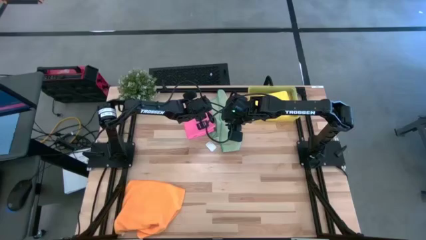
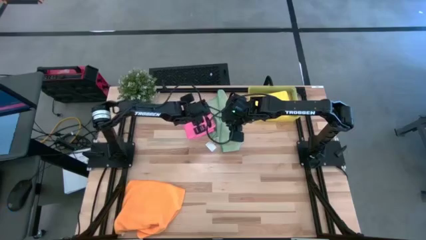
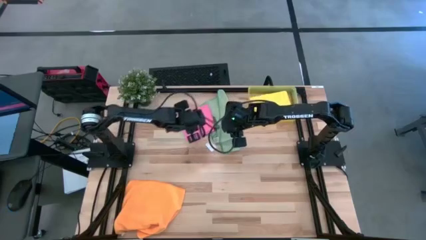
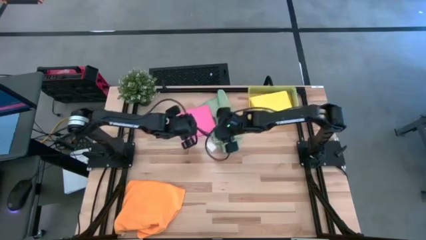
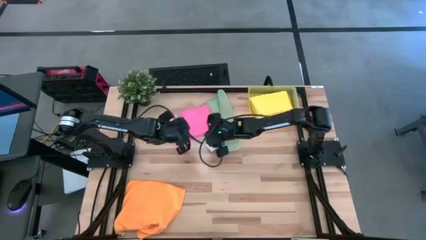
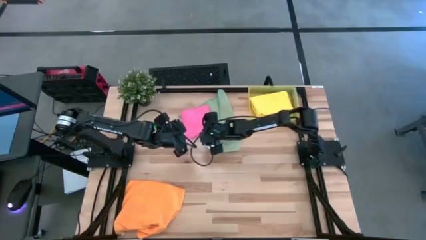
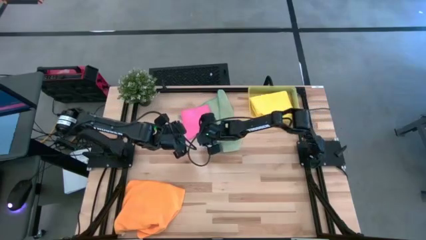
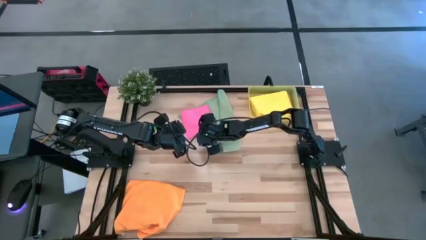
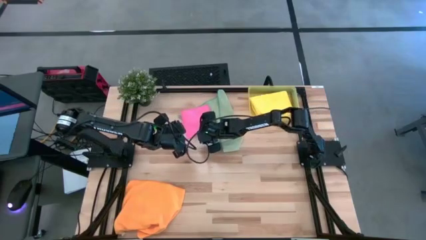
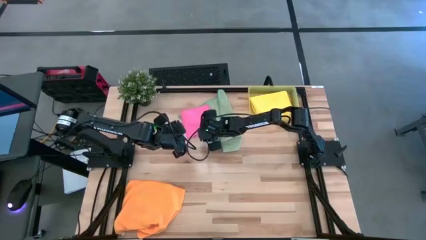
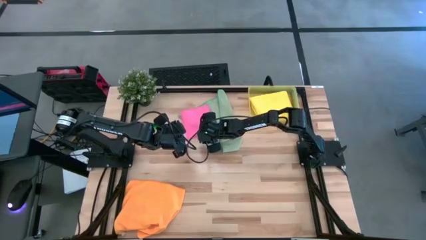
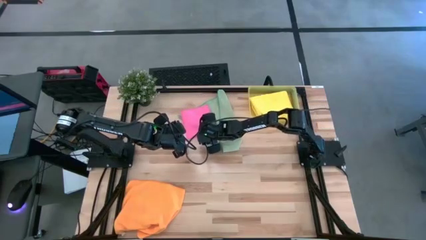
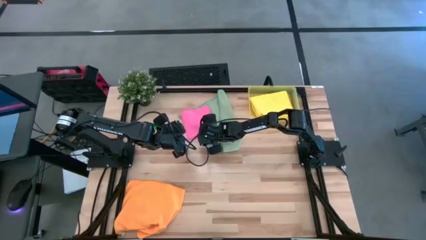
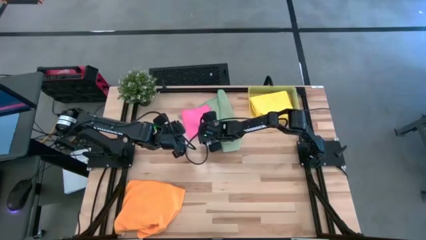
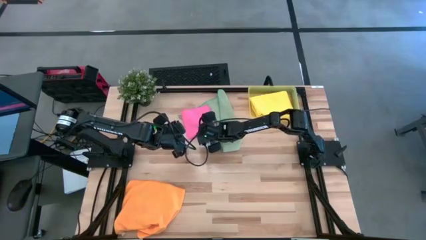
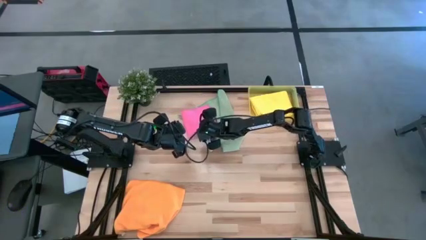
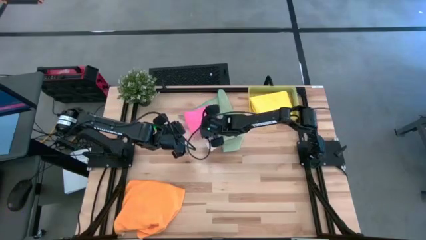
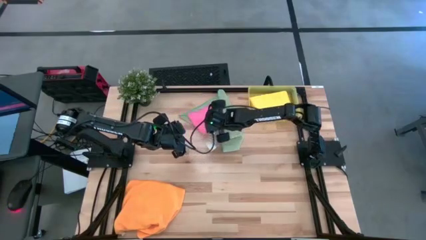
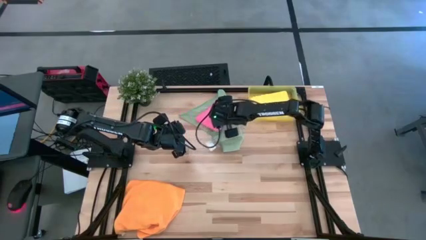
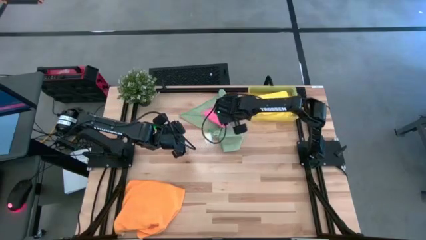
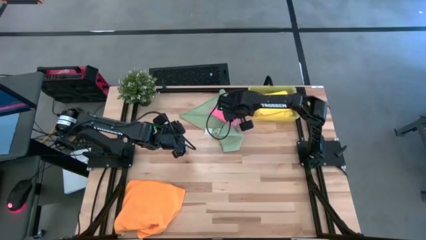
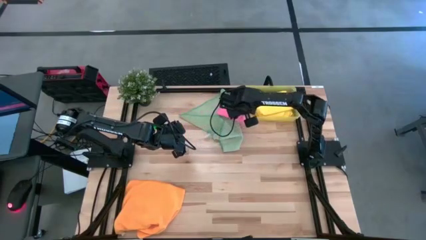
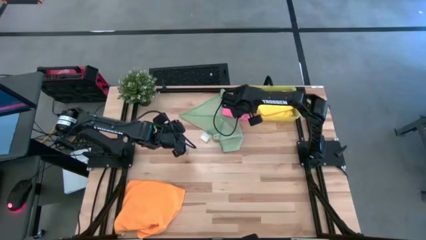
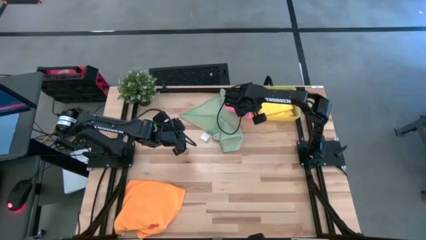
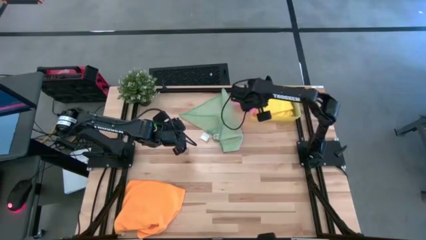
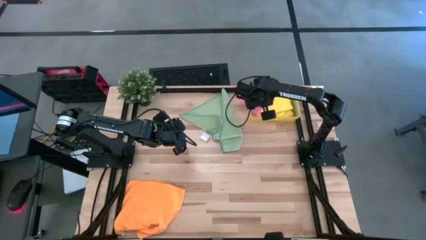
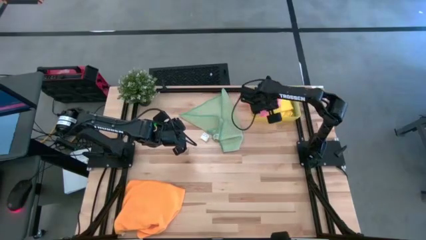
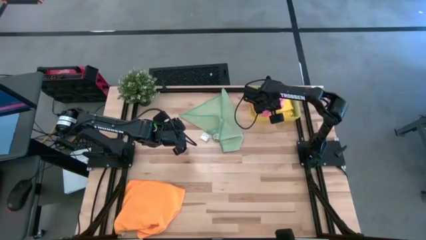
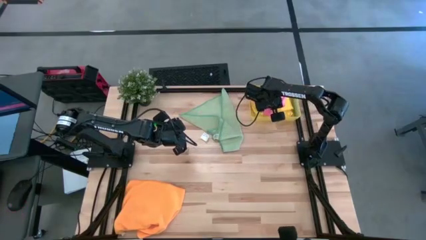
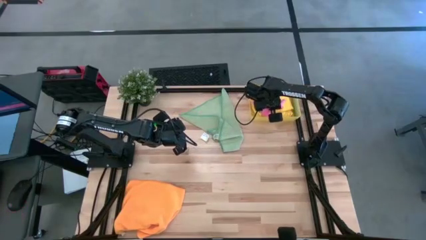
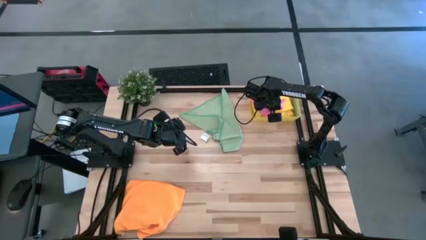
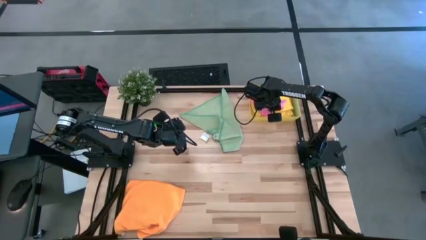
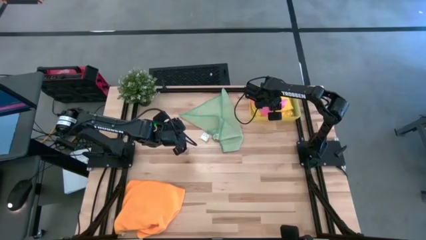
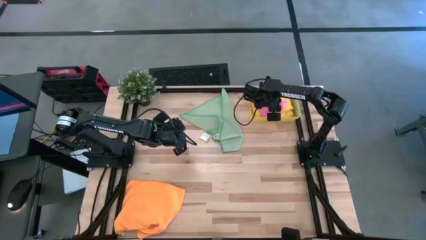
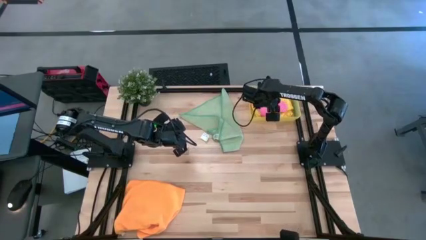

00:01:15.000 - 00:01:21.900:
Task: Fold microfiber towels
Put the pink towel into the bin

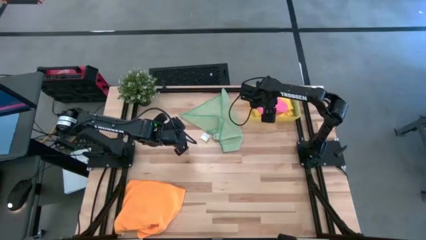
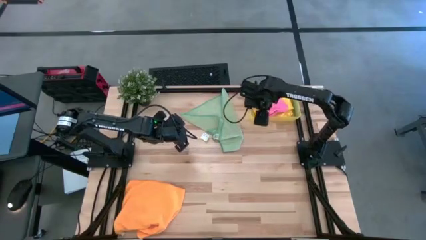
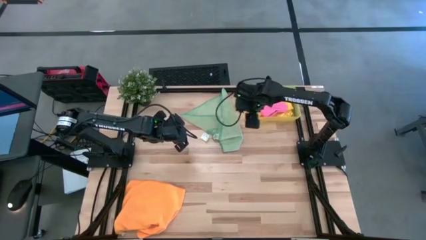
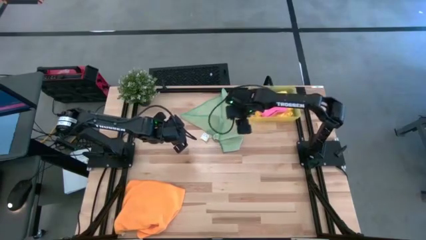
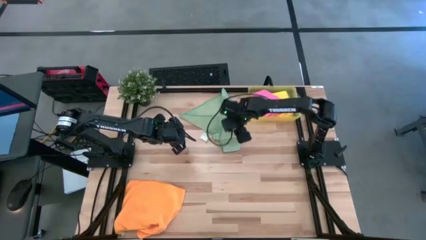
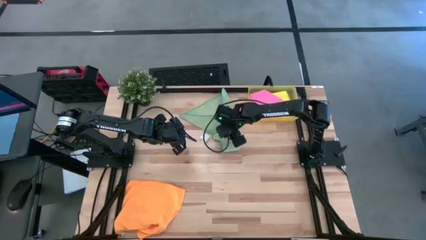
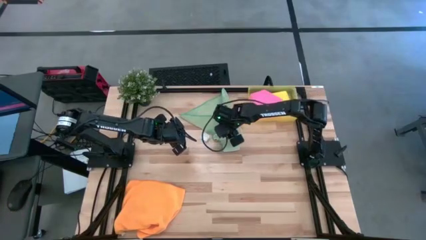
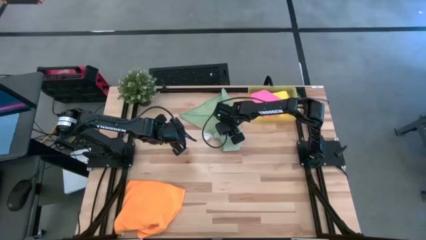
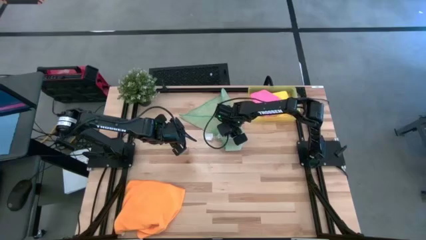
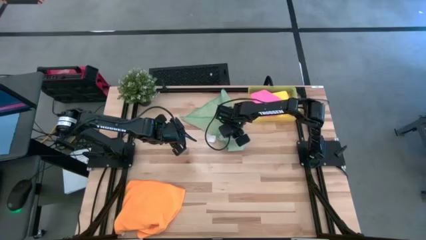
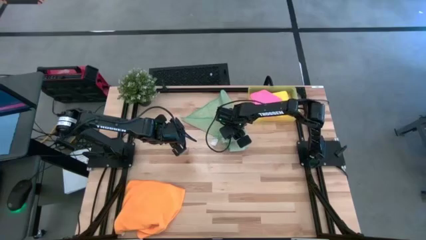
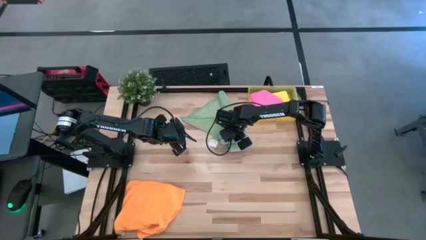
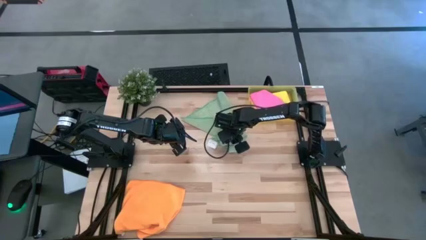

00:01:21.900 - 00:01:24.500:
Fold the light green towel

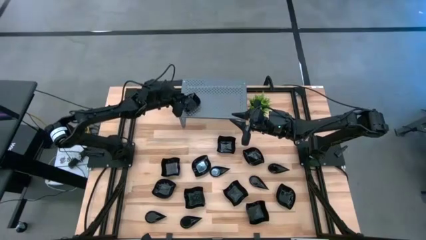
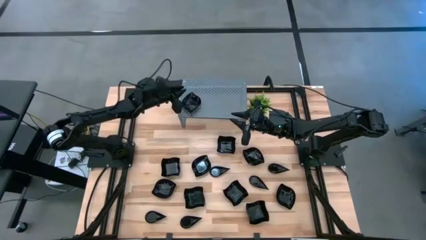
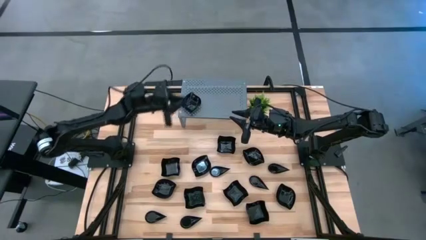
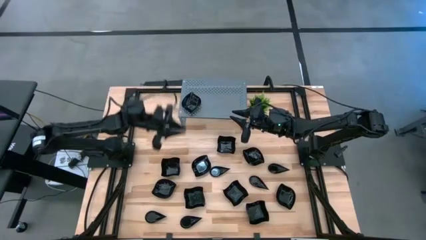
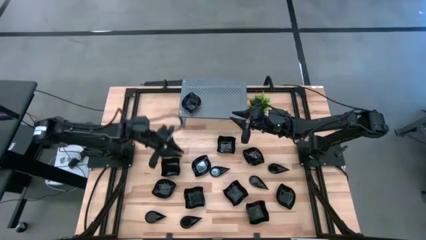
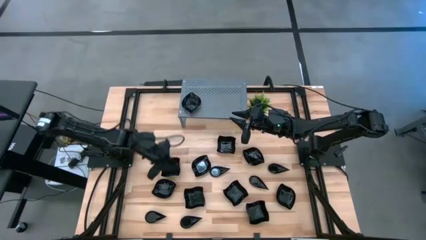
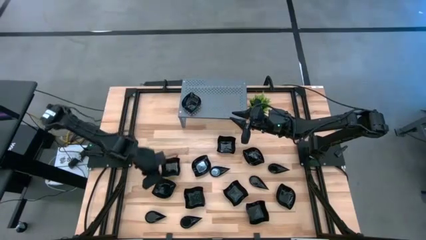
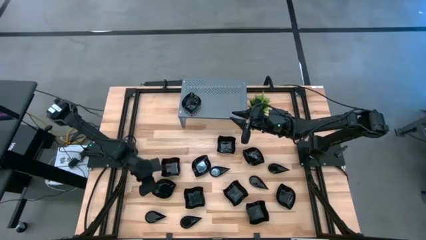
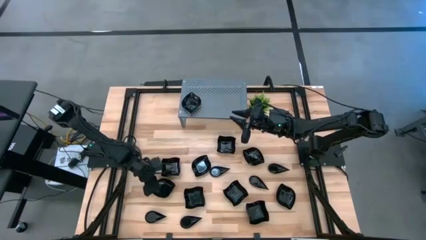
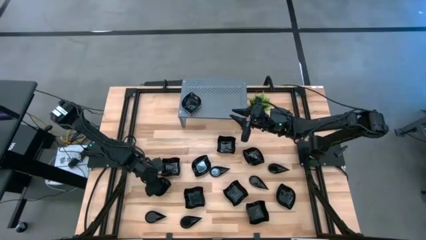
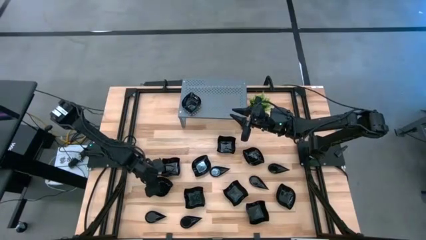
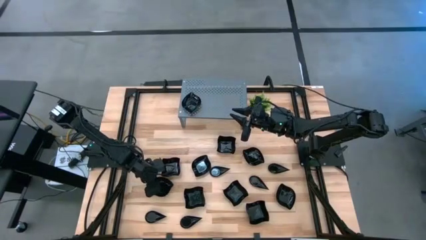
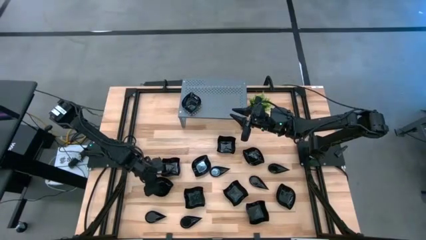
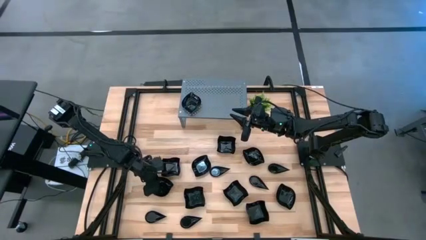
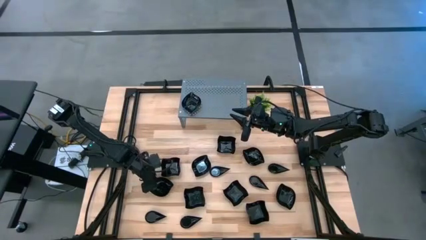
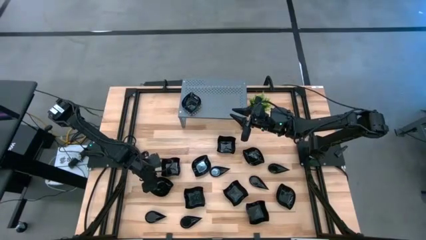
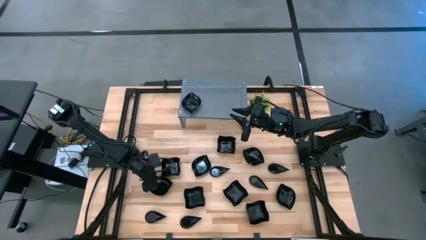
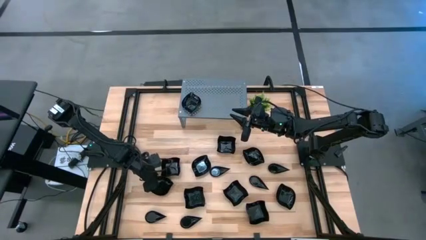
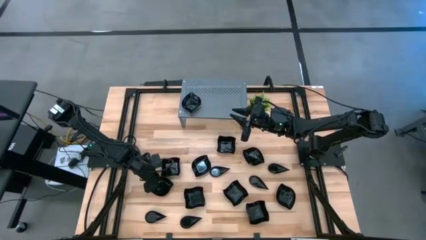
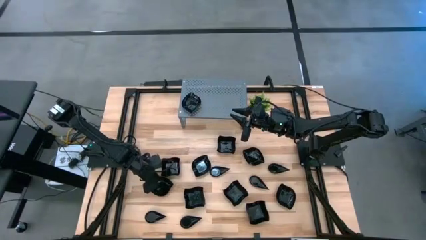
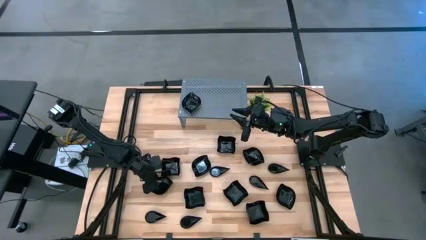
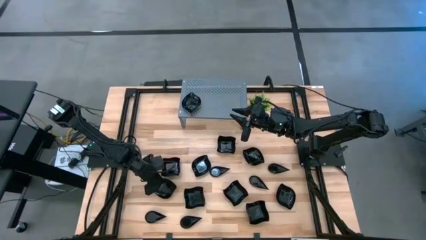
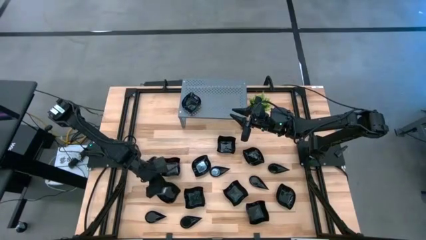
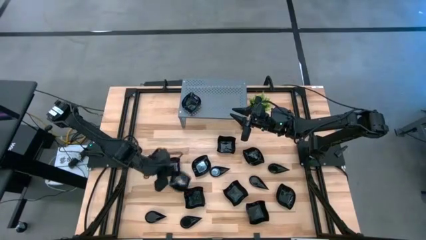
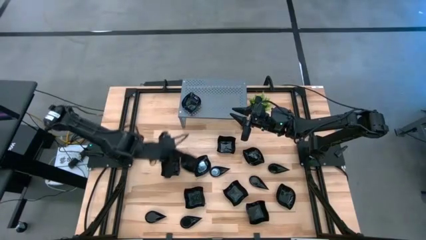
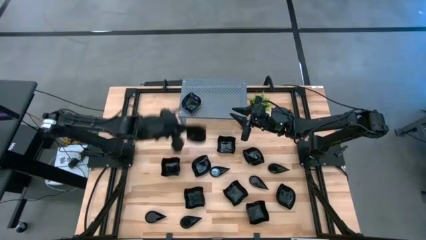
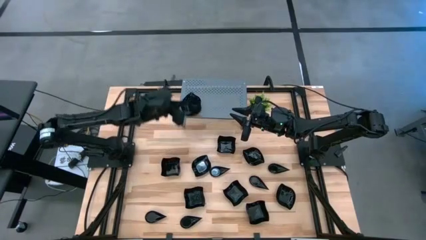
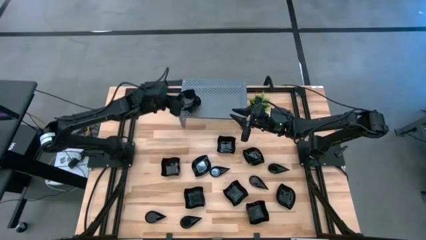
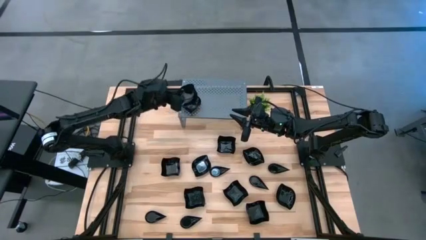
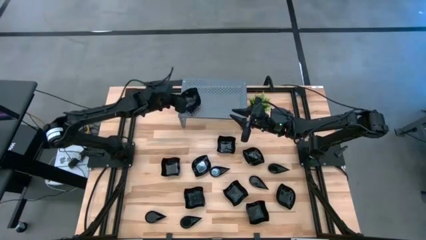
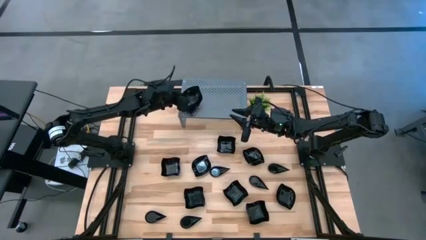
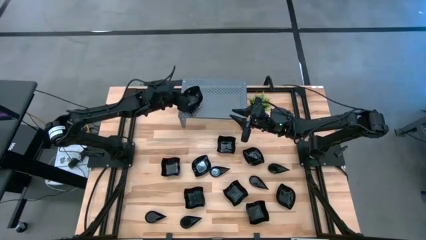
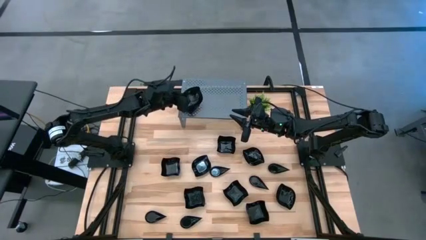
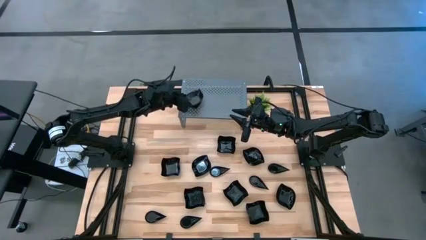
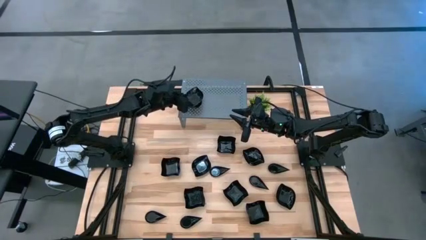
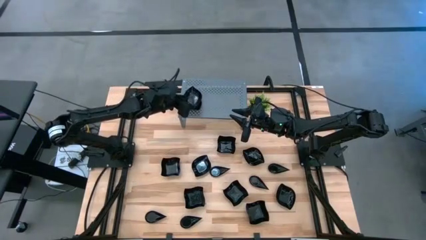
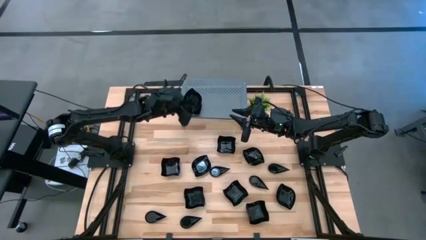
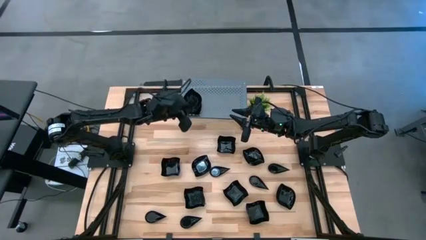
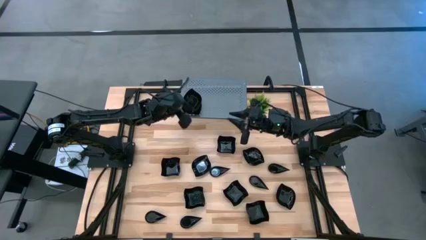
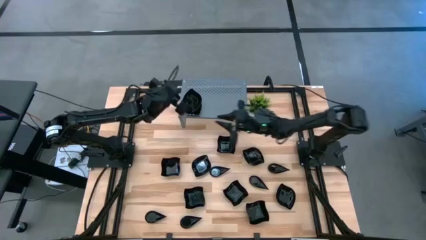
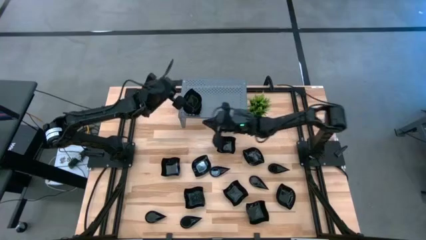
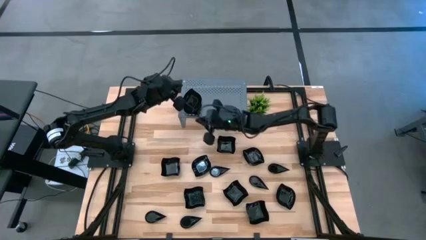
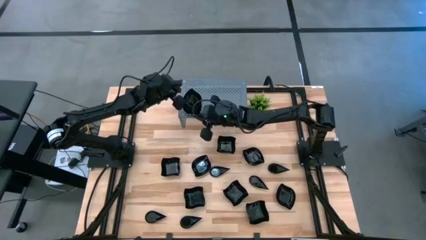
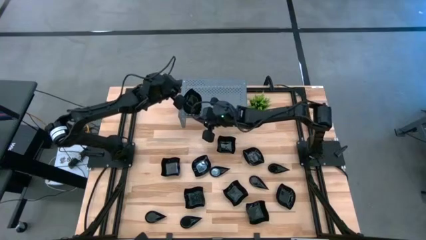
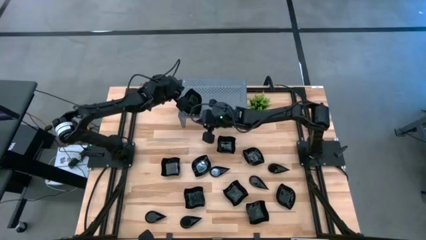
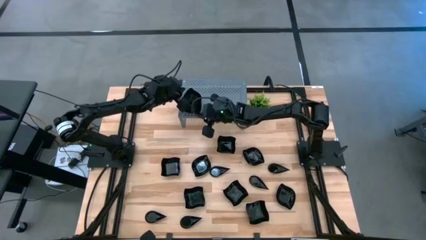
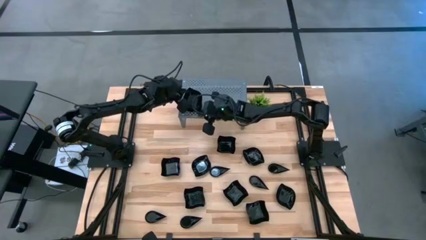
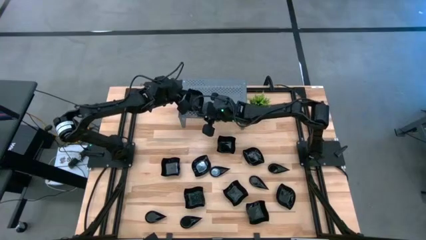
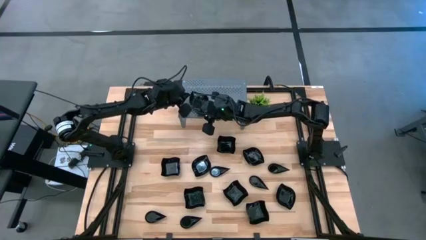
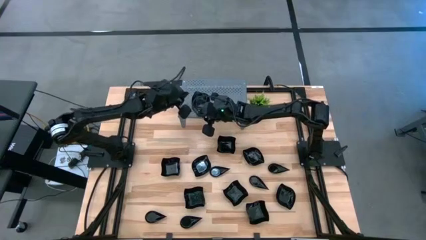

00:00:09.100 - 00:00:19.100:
Task: Pick & Place Mini shaped plates
Stack the black leaf-shaped plate on top of the black leaf-shaped plate on the shelf
